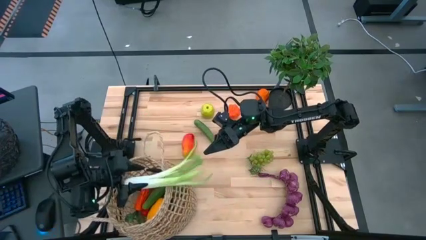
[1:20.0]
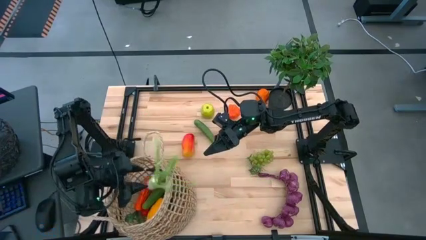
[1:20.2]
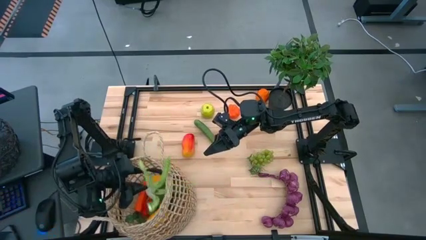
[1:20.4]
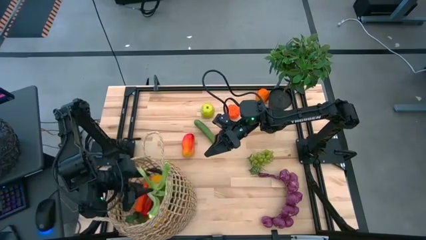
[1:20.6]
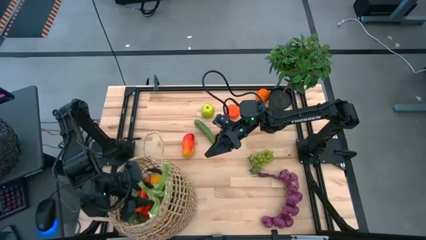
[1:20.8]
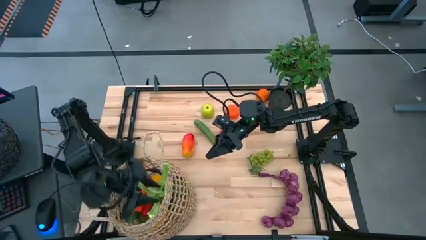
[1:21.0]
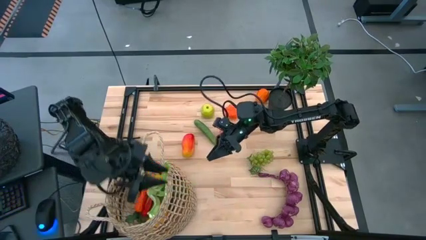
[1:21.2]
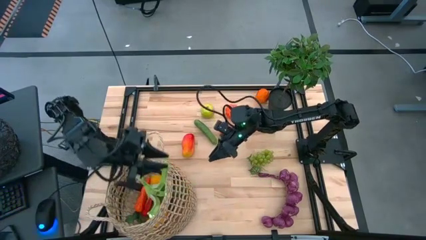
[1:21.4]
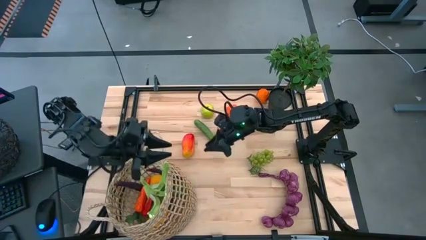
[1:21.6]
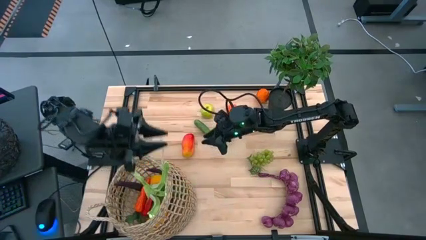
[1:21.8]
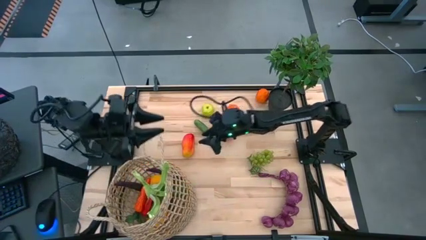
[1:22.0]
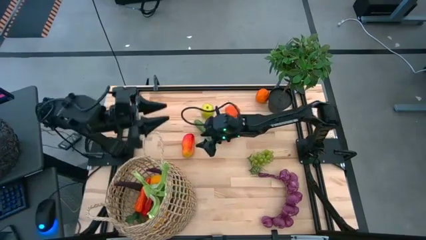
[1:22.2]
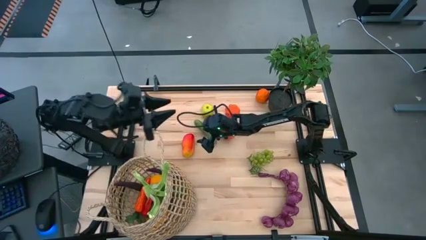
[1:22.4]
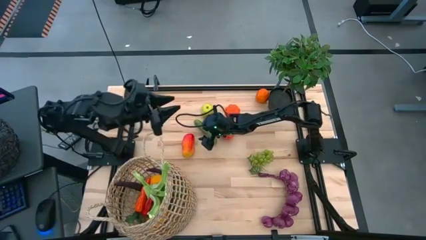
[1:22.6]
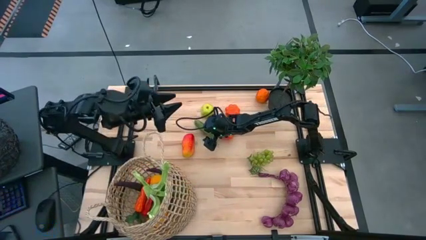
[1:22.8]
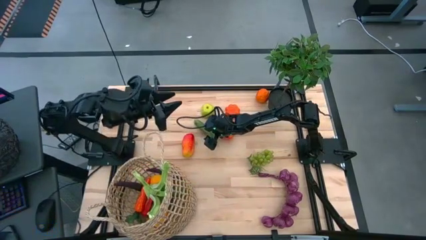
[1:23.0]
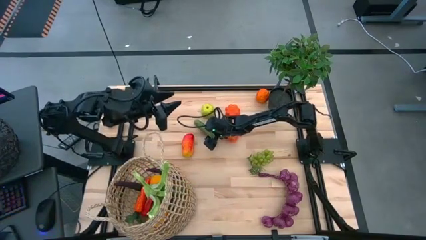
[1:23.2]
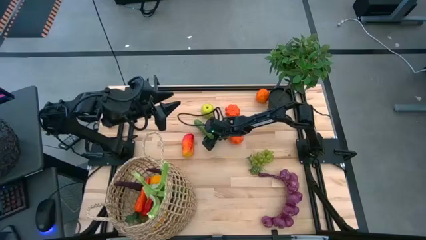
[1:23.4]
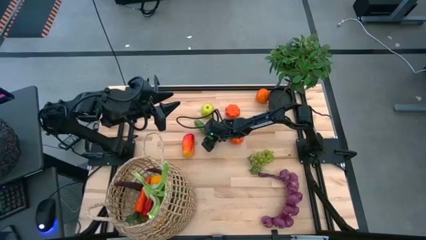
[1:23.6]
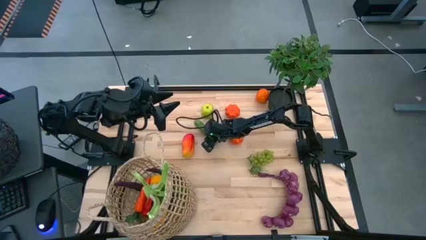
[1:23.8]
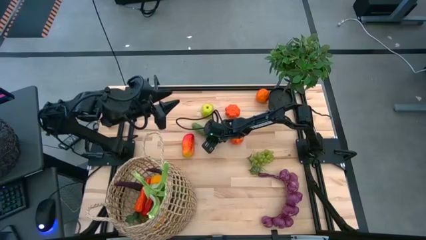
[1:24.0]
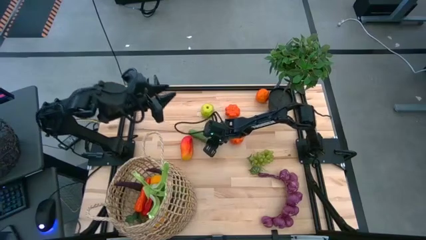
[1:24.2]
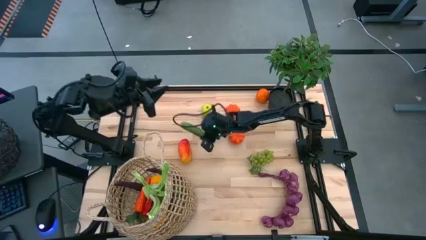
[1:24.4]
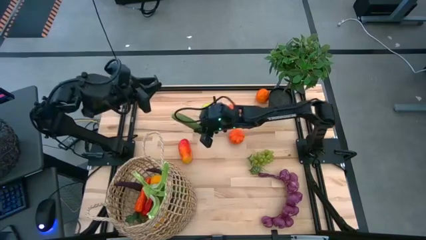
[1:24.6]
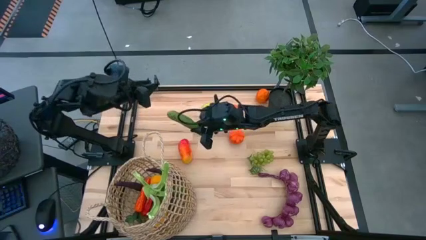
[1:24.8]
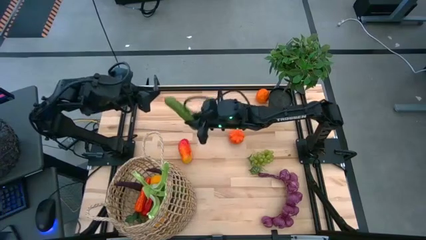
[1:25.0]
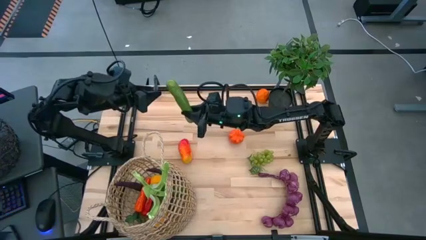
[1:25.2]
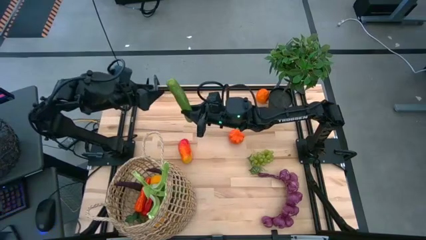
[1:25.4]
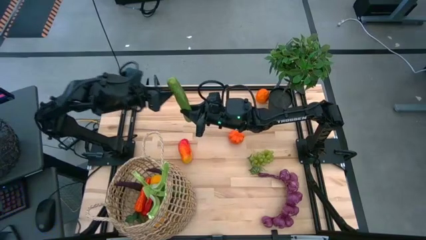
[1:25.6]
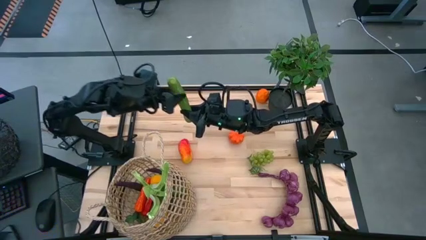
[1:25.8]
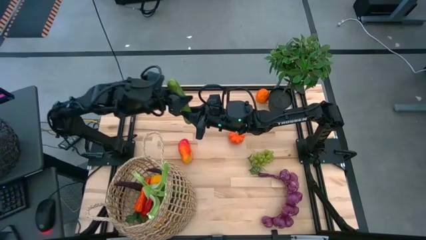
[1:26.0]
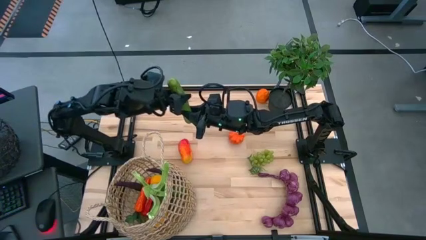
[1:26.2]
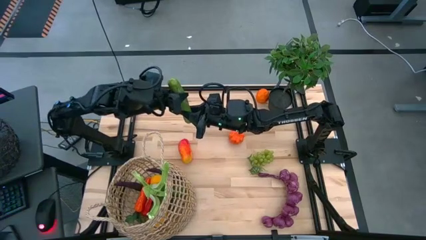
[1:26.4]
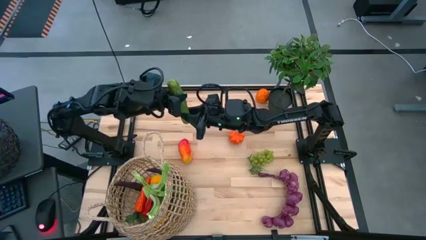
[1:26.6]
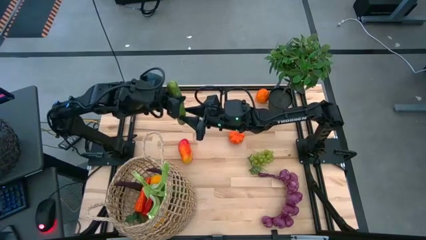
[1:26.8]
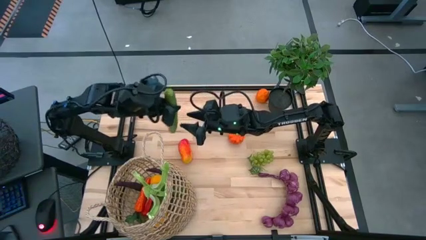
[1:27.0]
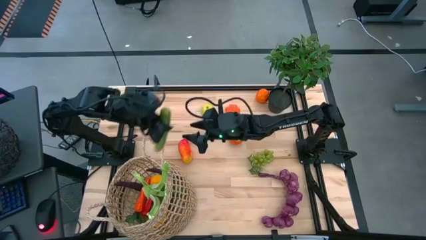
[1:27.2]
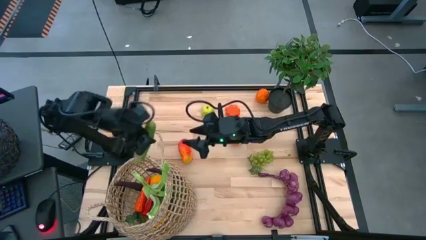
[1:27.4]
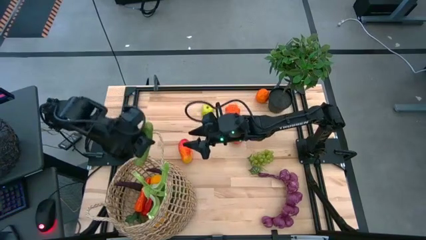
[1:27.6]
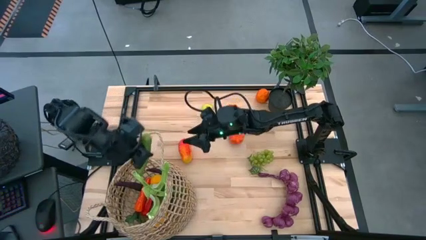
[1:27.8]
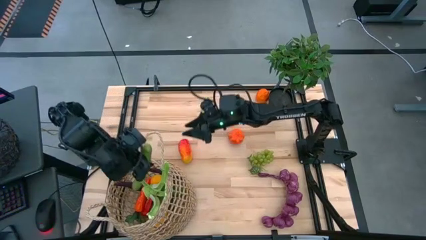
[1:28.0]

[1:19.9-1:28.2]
Task: Build produce basket
Put the cucumber into the basket

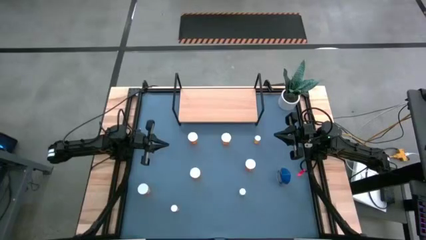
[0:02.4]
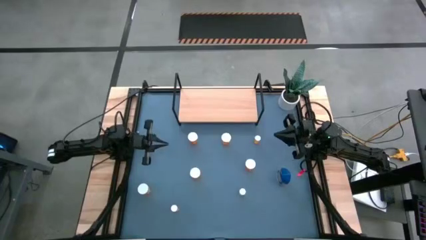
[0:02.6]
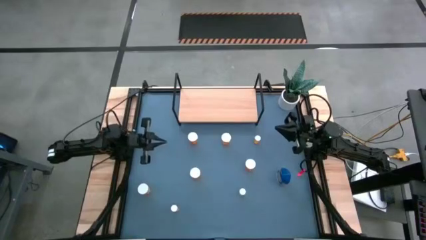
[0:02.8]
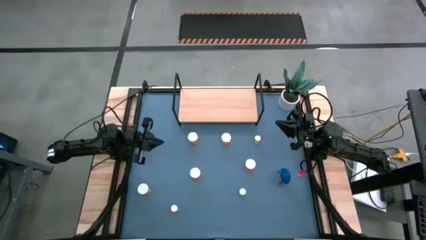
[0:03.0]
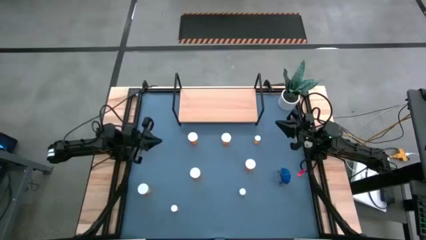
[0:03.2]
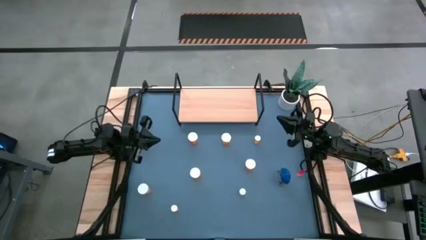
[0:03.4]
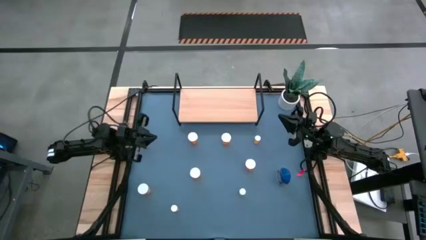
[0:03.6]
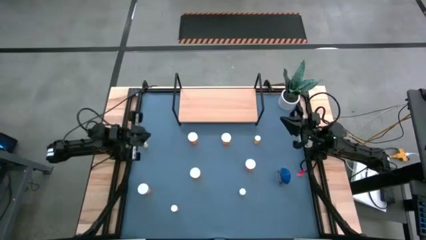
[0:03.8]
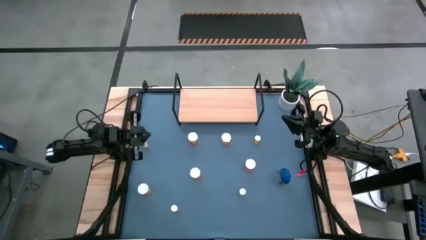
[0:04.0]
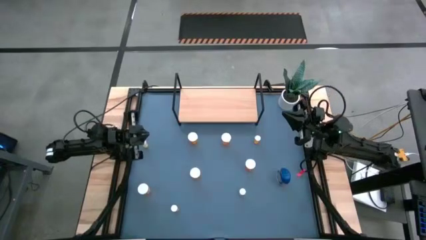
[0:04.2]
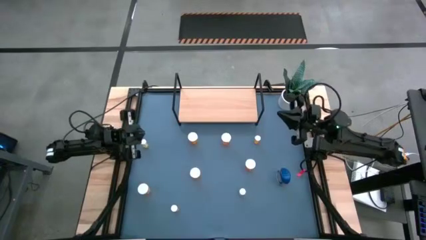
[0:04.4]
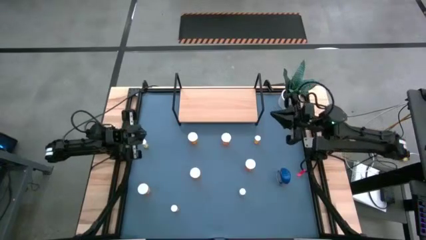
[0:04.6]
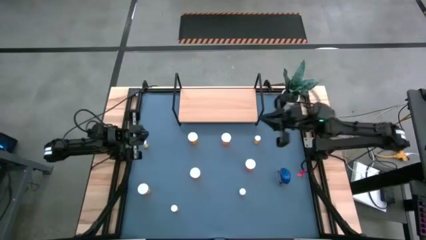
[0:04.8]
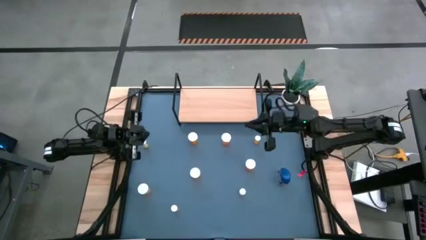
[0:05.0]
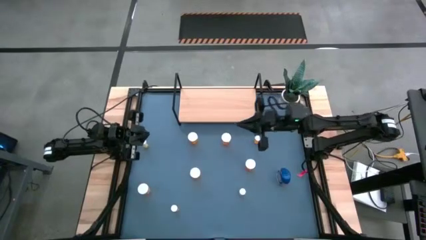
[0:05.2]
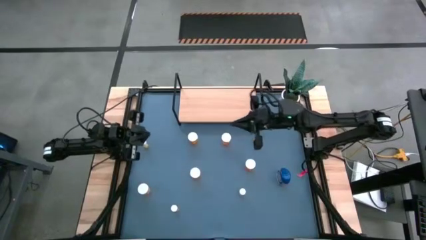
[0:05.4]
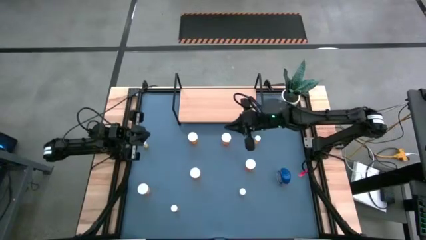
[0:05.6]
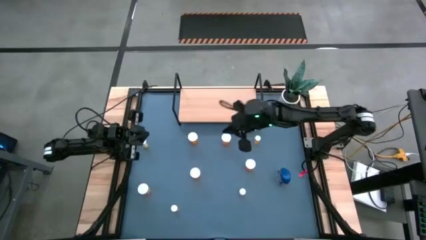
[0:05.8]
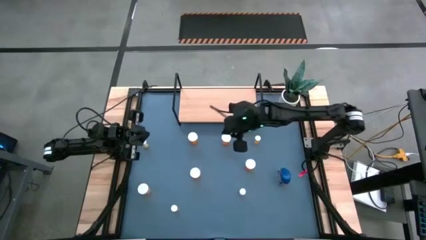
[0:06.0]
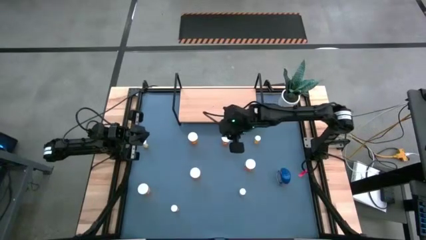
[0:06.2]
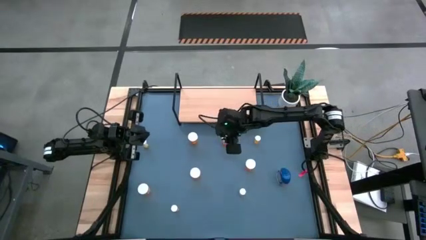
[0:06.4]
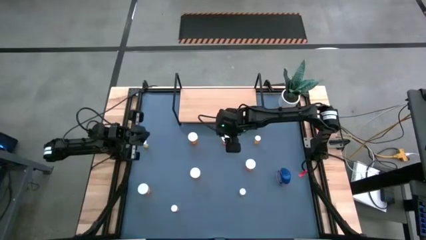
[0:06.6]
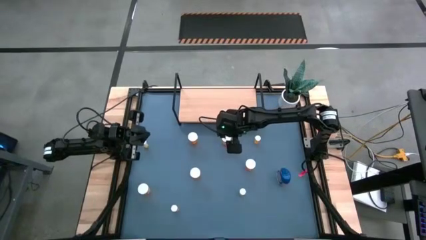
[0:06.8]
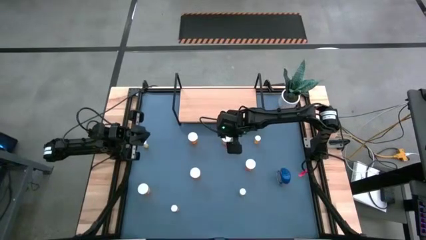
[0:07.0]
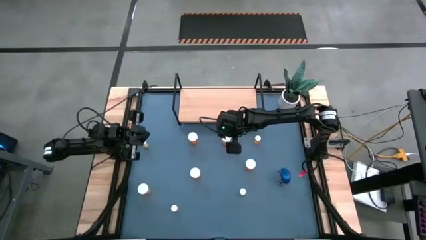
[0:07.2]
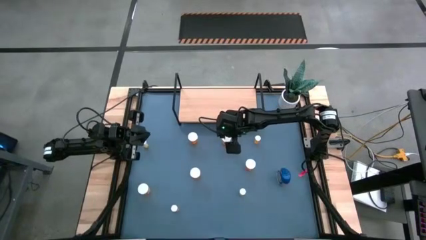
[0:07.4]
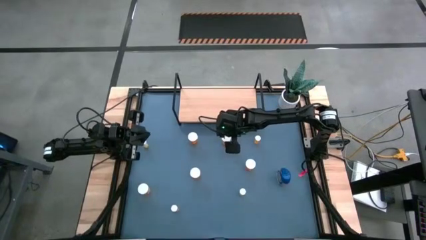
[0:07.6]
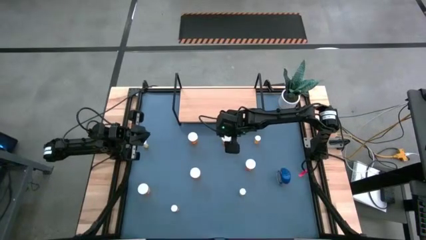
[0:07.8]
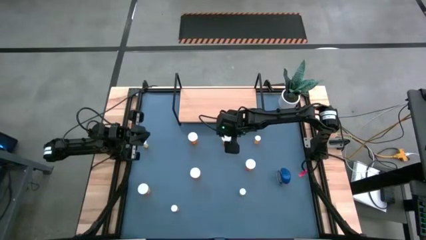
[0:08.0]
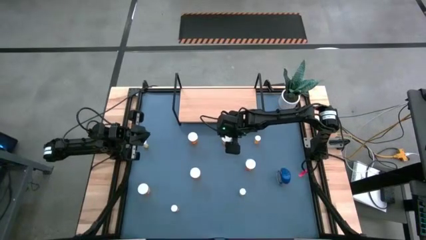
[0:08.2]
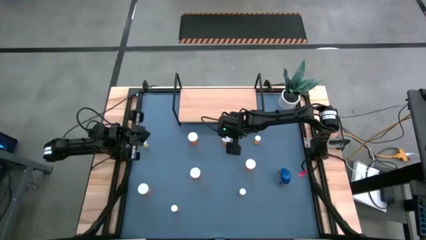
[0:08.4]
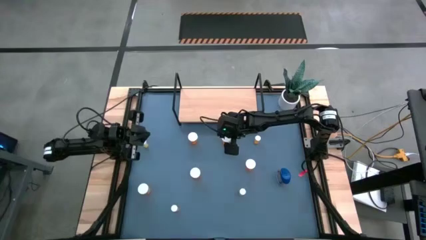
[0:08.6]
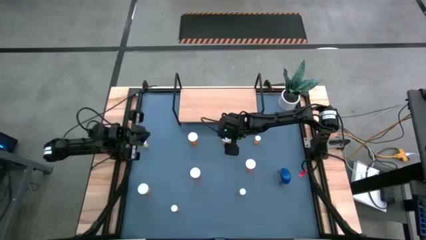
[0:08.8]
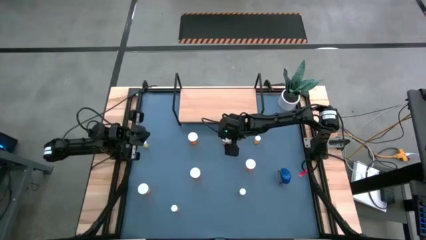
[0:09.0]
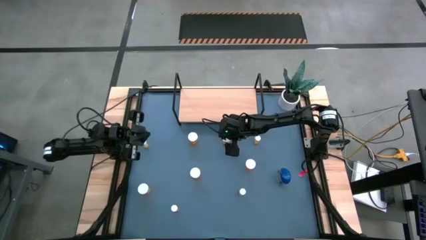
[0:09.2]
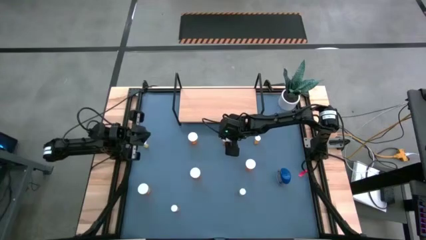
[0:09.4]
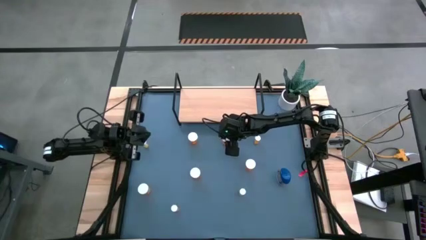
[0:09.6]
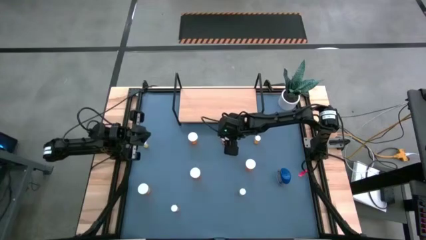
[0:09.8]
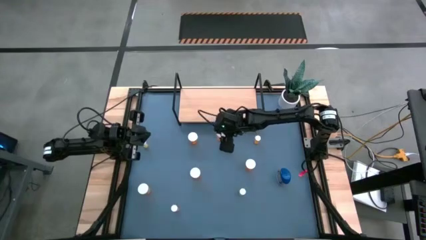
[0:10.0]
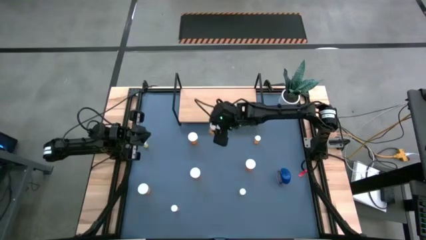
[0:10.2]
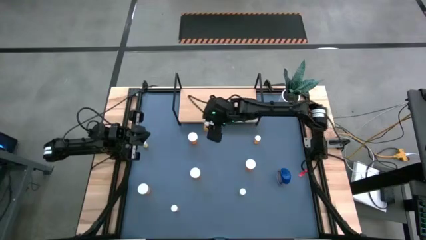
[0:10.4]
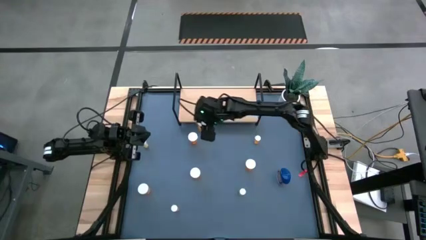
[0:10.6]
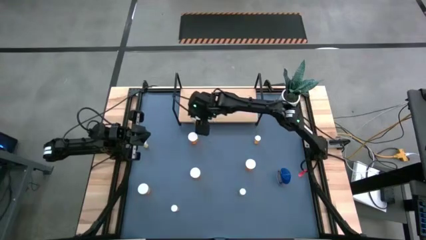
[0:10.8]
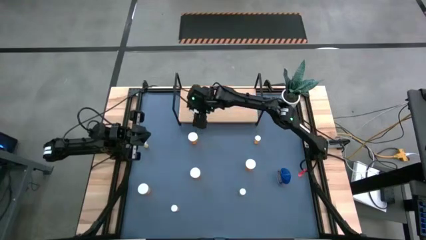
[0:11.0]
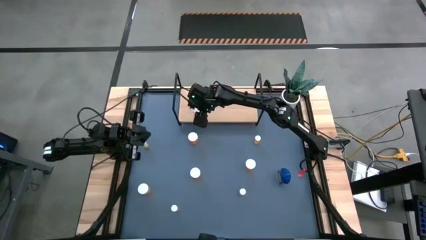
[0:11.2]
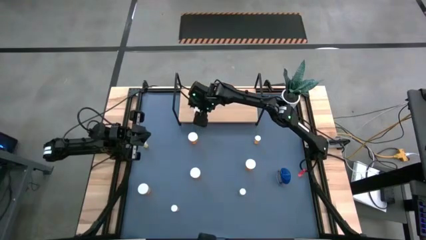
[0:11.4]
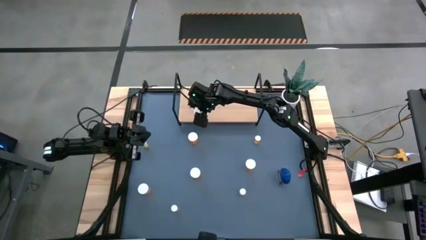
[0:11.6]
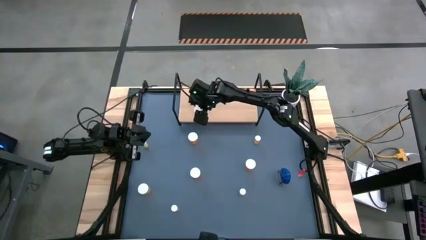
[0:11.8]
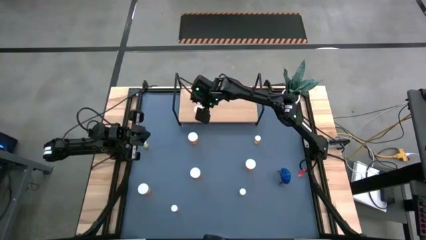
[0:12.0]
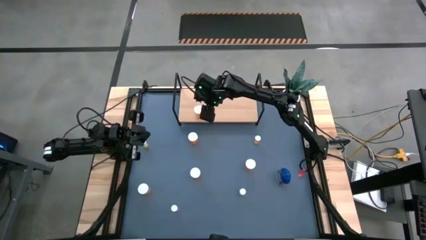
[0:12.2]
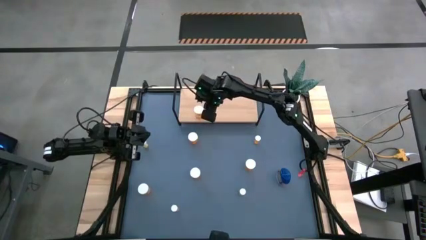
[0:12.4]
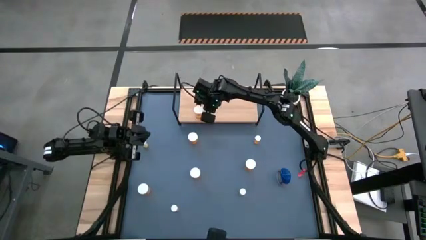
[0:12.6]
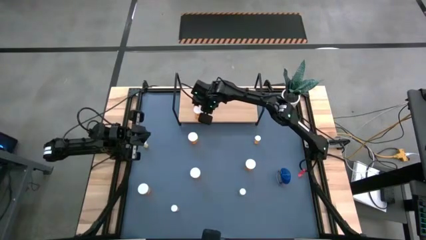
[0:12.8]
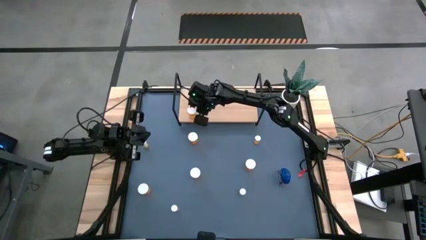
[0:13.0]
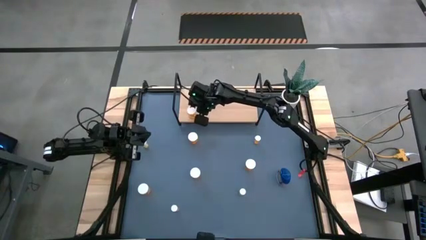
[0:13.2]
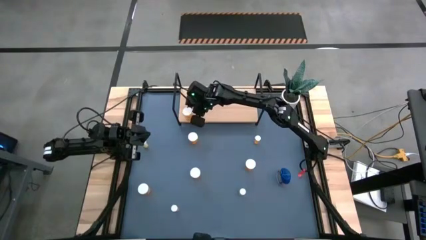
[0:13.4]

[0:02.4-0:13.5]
Task: Pick and place medicine bottles onto shelf by color
Put the orange pill bottle on the shelf
